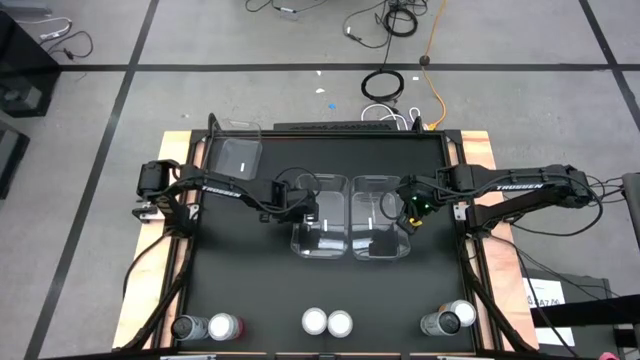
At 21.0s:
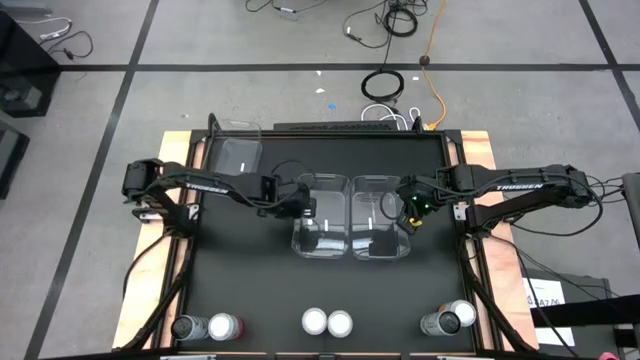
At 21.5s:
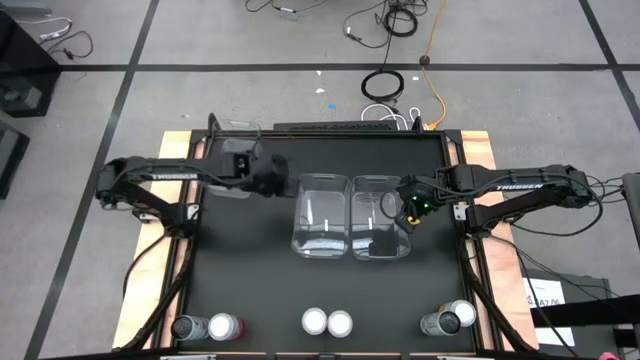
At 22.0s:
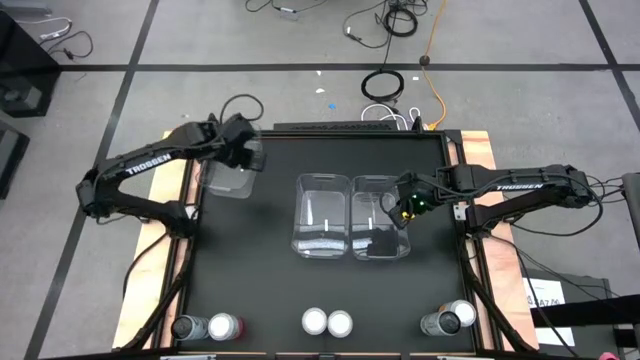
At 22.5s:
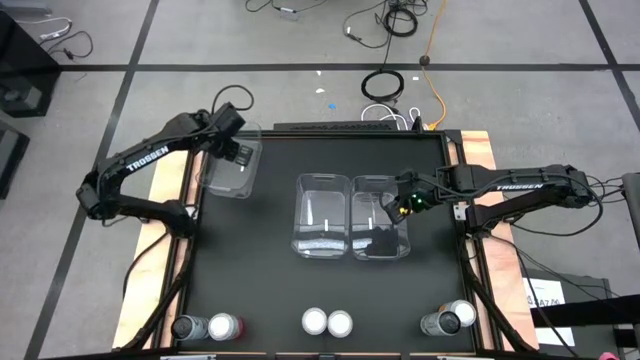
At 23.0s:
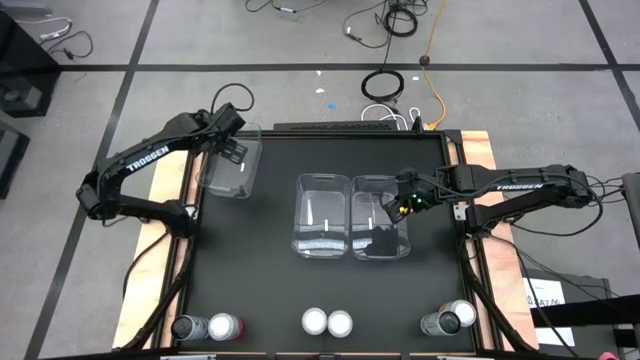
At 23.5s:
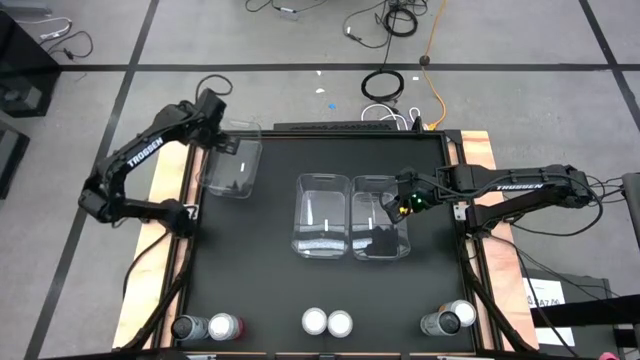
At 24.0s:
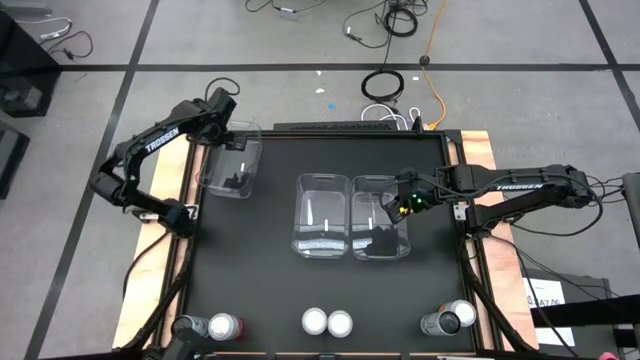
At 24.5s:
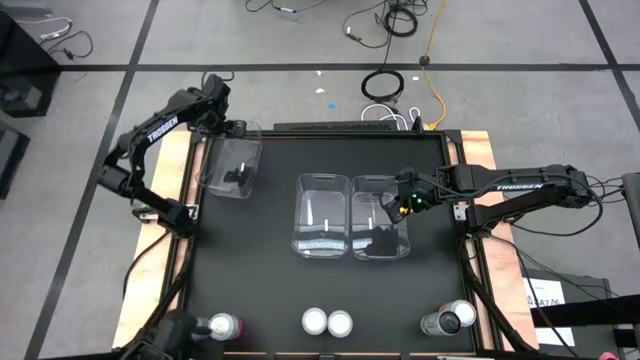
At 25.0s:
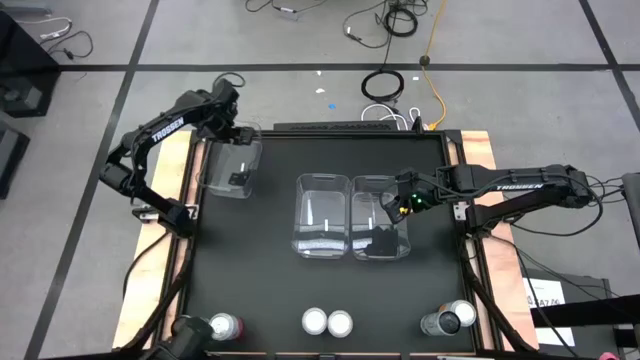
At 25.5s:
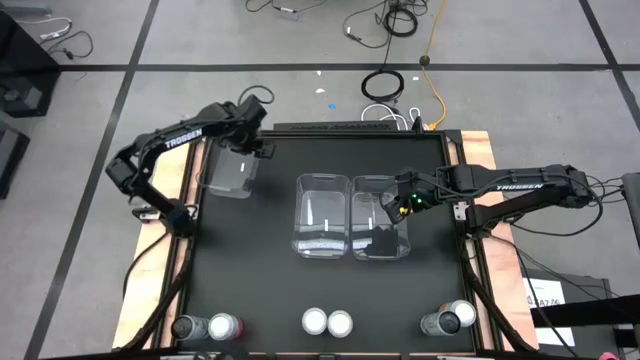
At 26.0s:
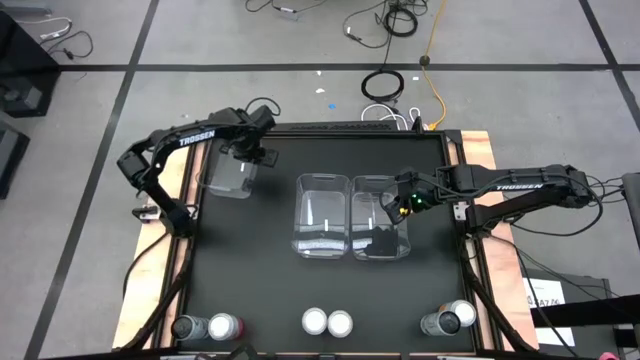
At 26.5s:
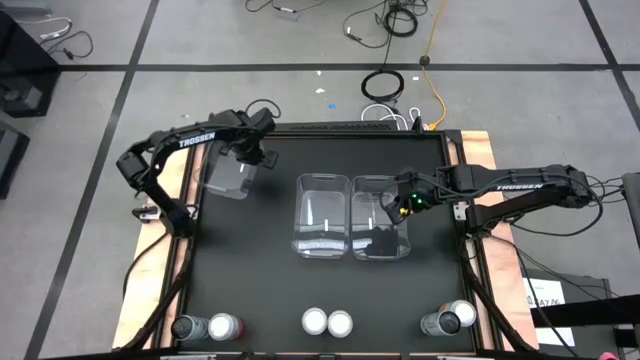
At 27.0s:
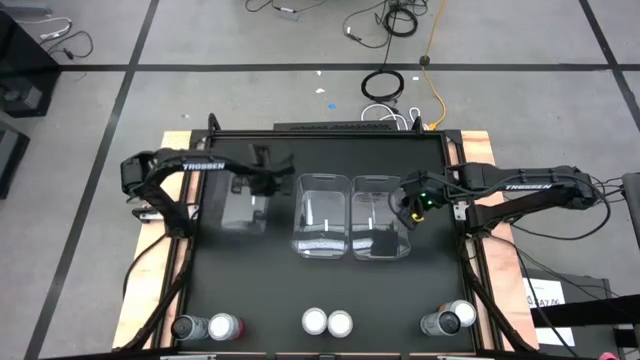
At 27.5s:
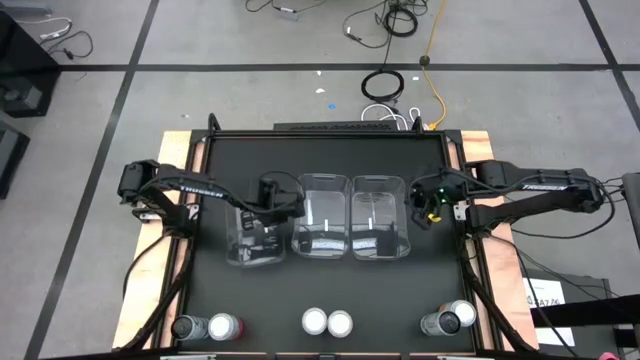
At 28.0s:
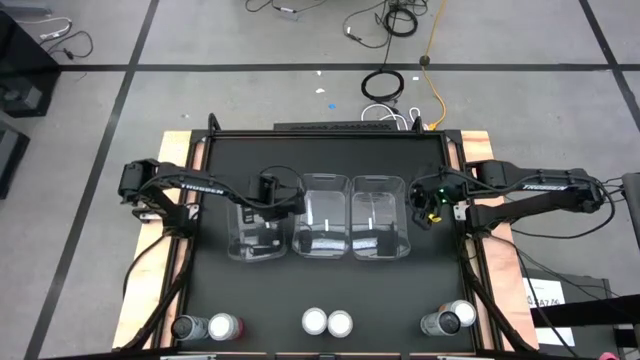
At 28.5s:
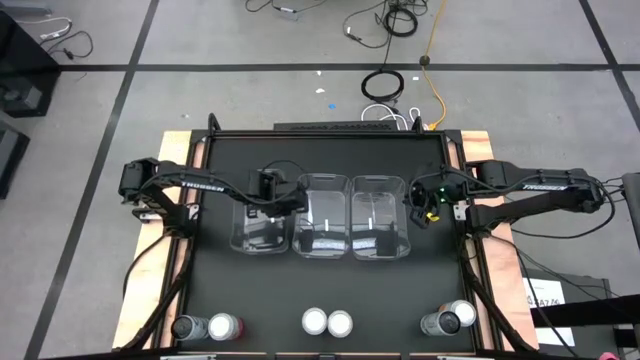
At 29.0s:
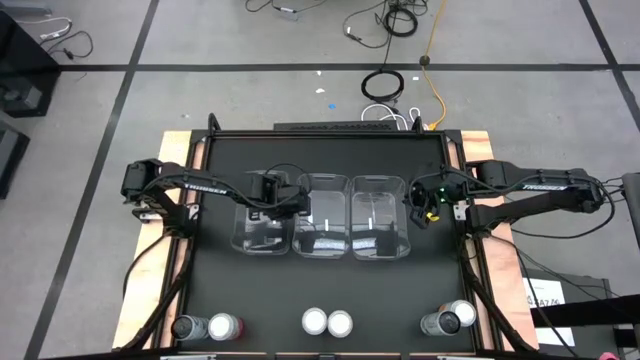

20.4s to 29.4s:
Task: Sort soda cans
Move the top left transparent bin to the middle left of the table

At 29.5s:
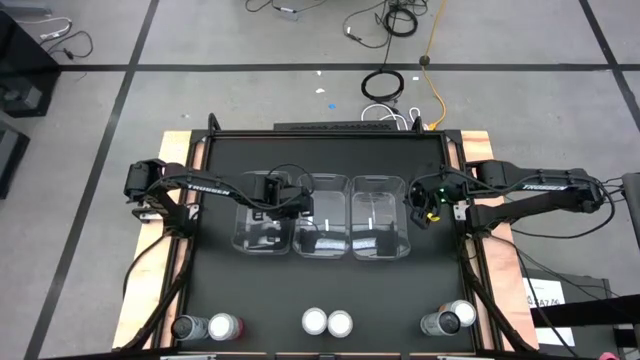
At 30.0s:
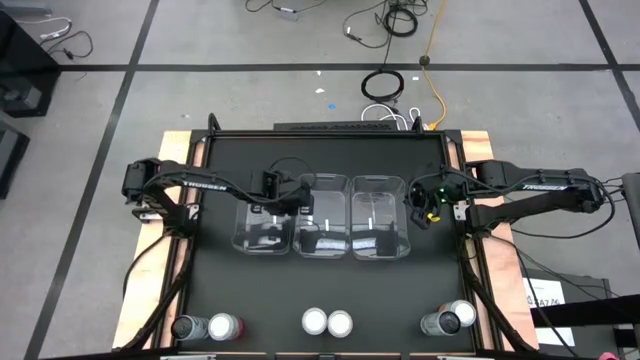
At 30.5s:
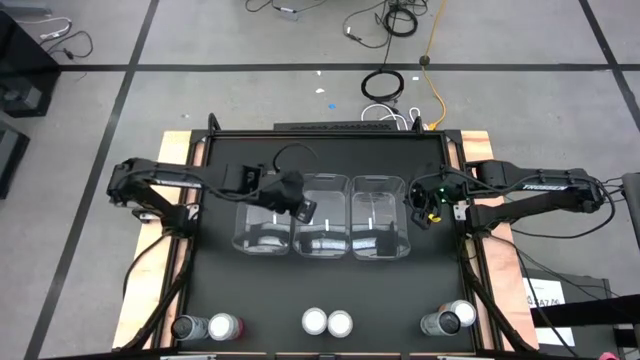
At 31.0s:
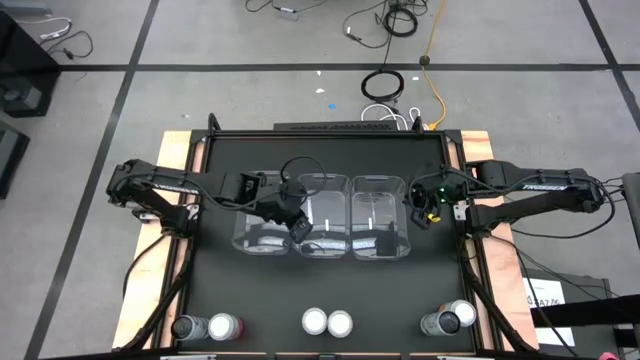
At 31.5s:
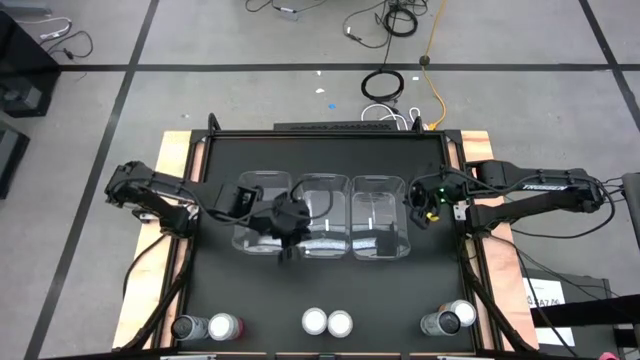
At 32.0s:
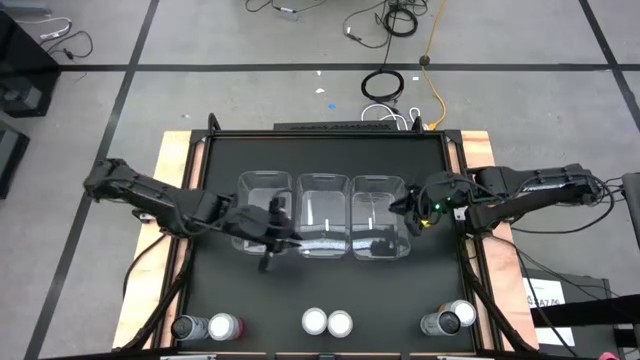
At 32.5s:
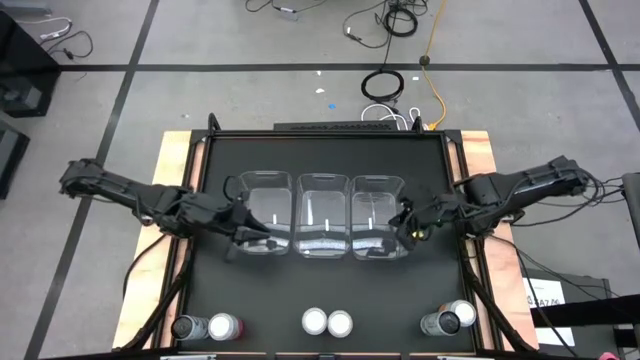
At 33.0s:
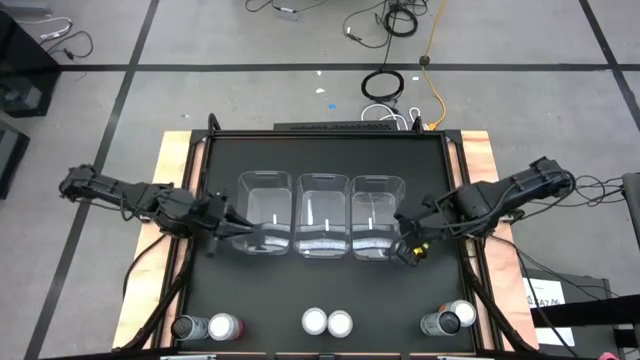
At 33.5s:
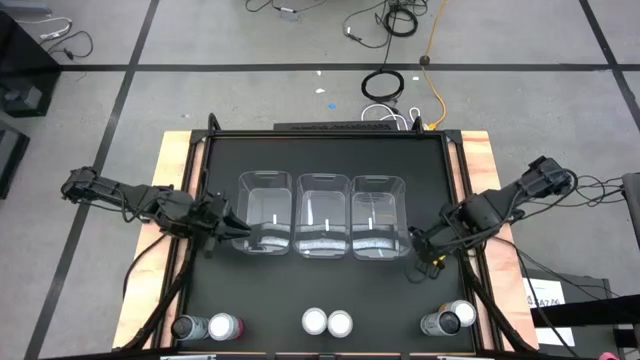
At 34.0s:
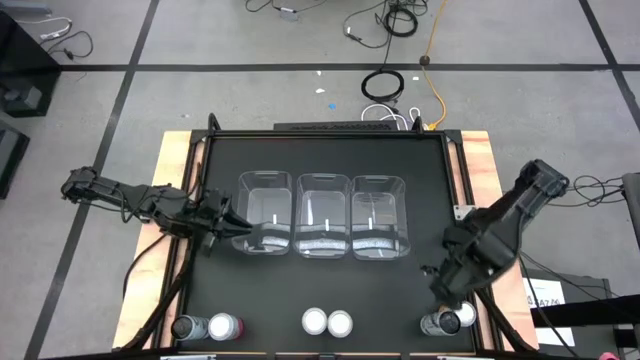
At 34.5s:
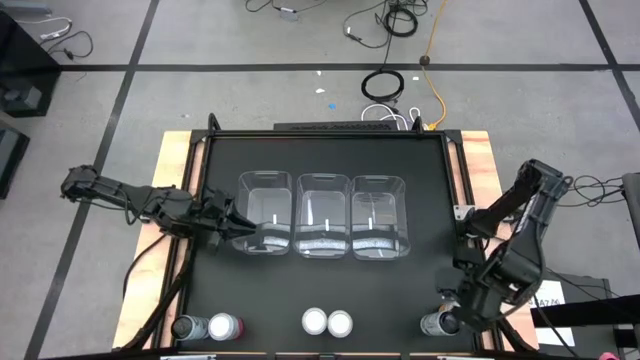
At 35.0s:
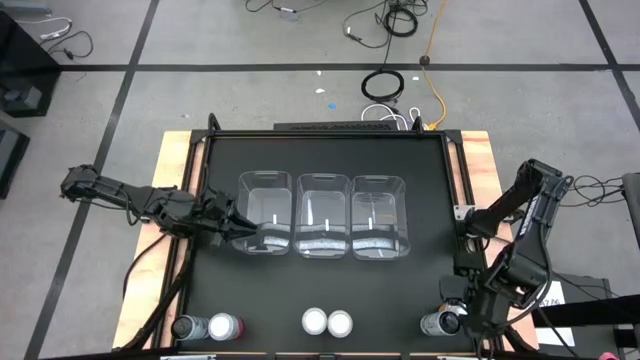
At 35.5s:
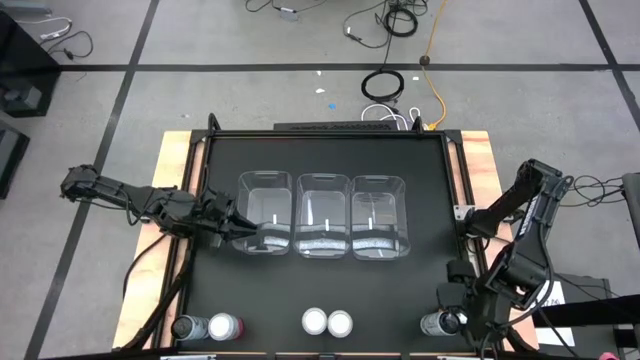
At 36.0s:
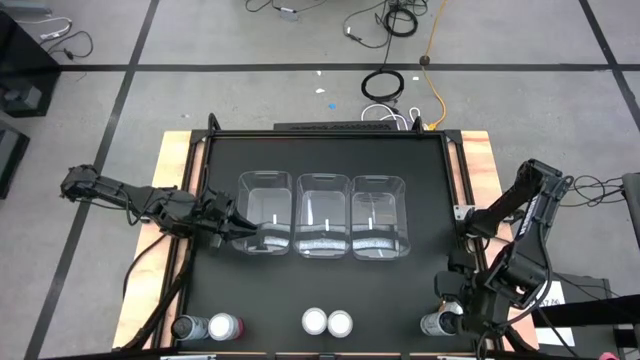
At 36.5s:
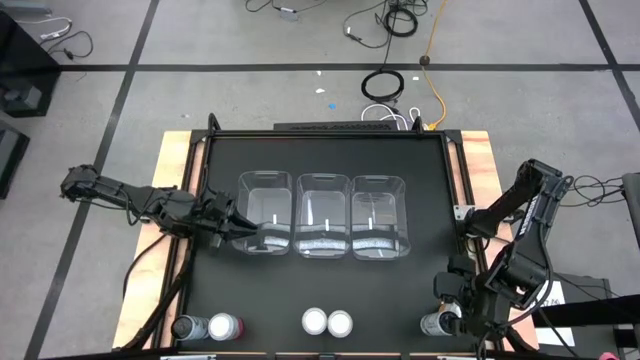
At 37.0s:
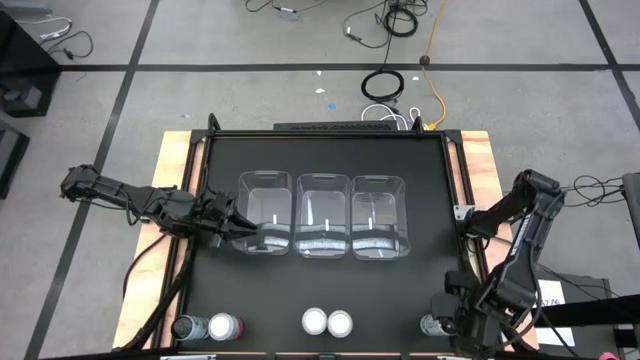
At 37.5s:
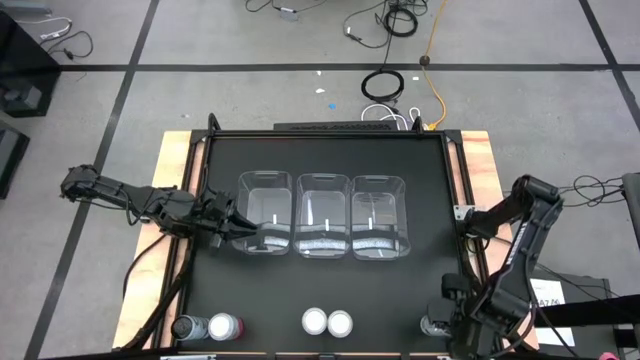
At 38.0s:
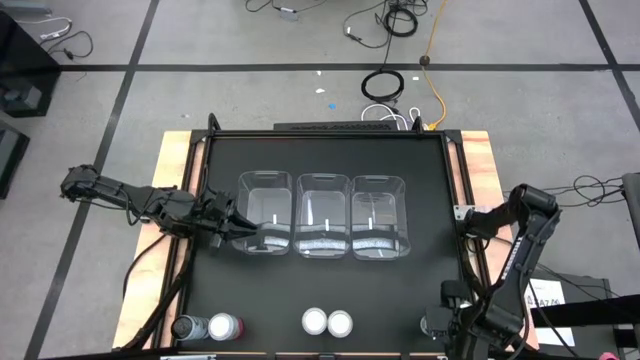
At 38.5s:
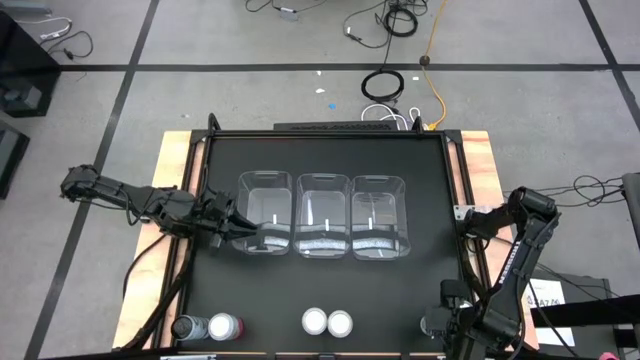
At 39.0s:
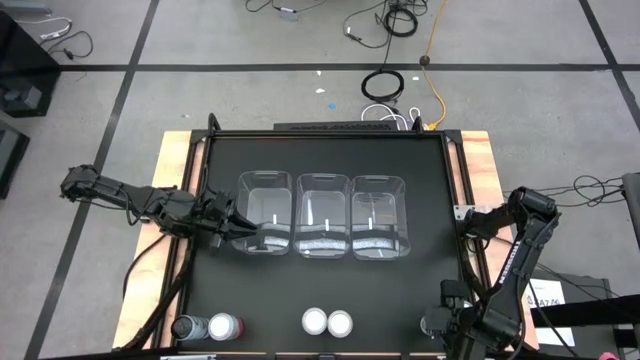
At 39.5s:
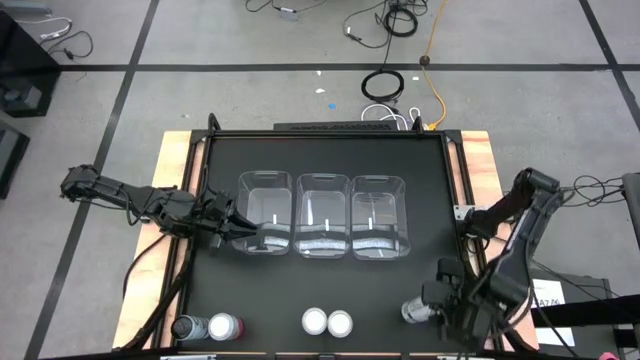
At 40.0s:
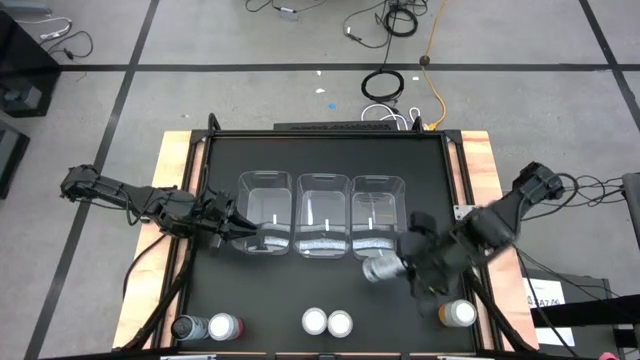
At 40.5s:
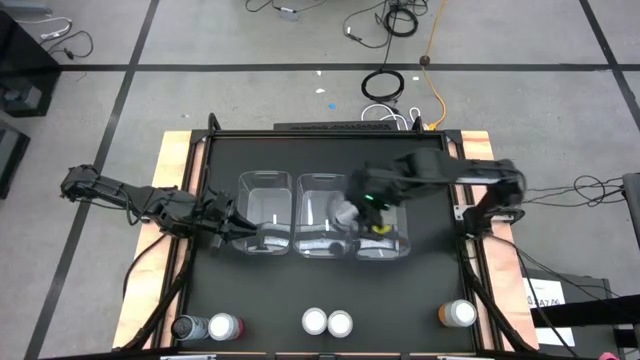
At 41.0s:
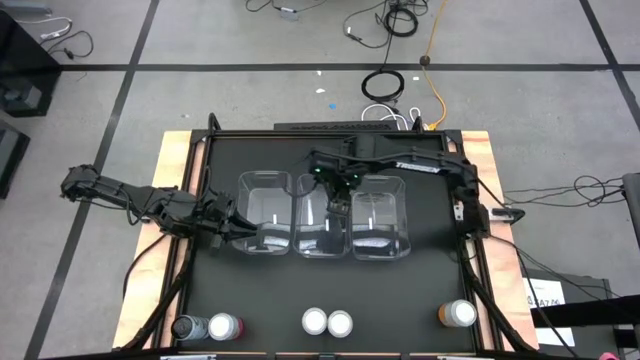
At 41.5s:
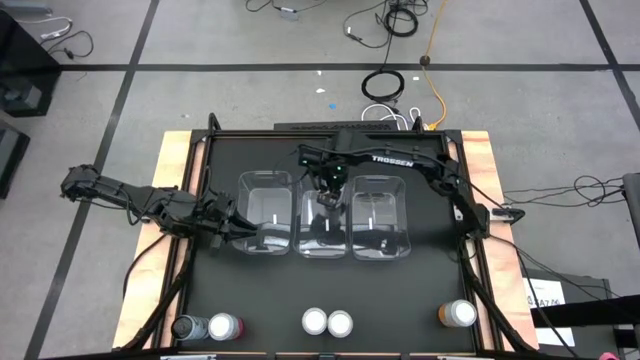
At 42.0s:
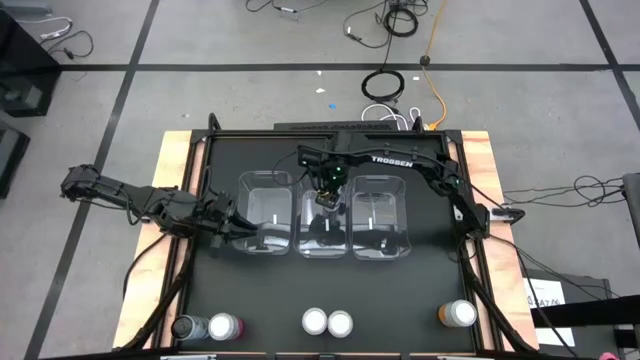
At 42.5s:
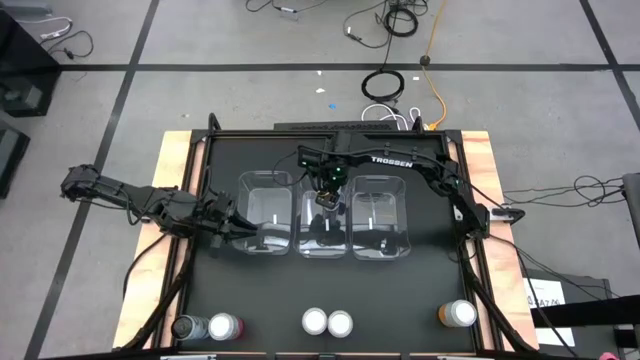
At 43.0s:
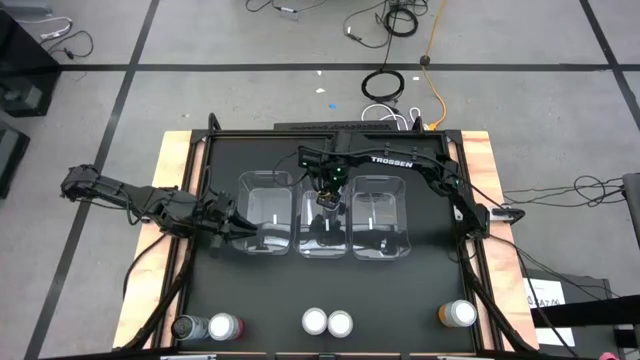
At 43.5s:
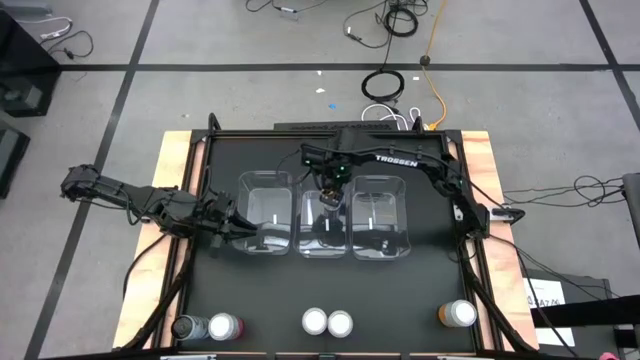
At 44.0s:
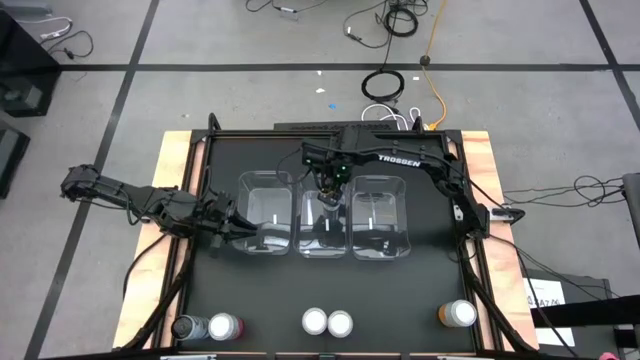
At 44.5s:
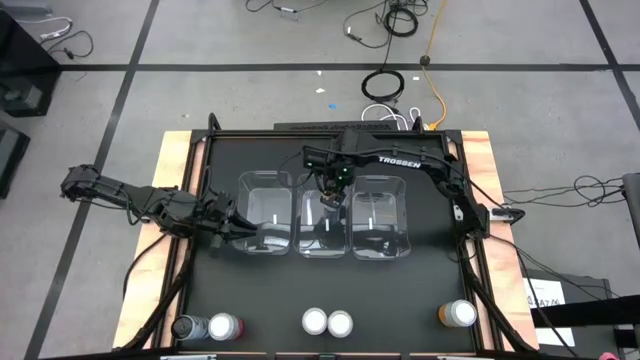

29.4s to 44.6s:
Put the right white-blue soda can into the center transparent bin
